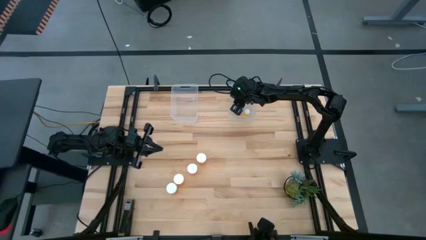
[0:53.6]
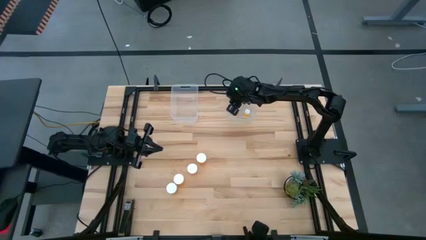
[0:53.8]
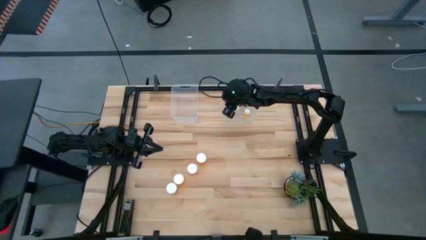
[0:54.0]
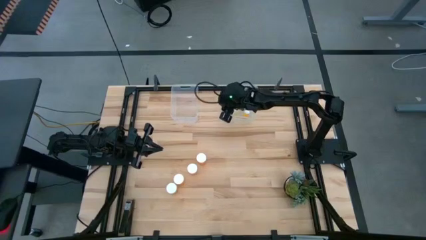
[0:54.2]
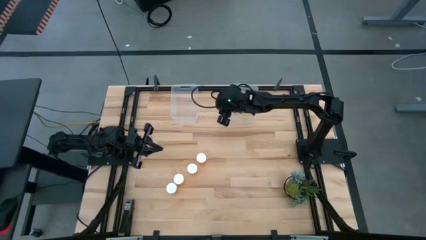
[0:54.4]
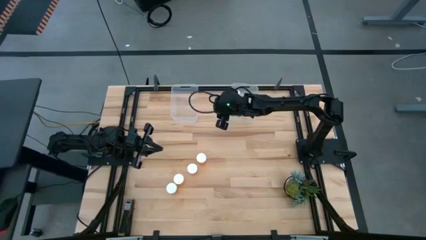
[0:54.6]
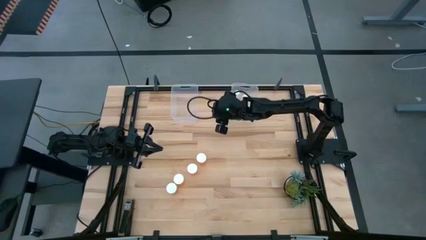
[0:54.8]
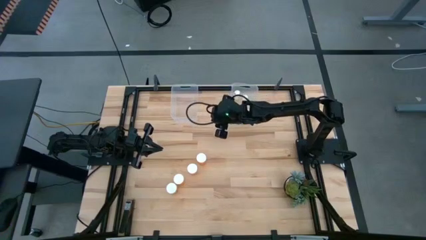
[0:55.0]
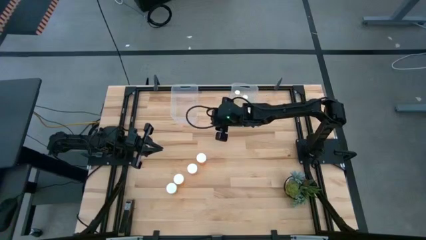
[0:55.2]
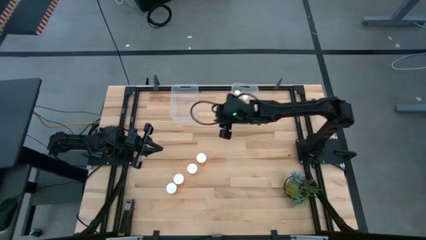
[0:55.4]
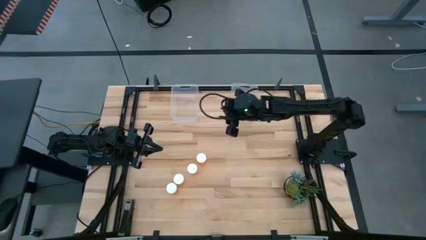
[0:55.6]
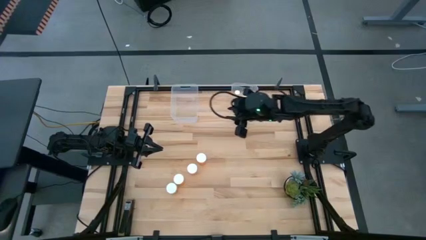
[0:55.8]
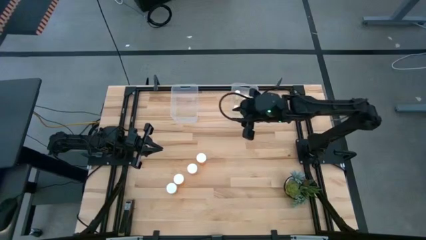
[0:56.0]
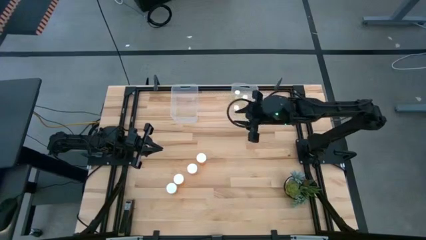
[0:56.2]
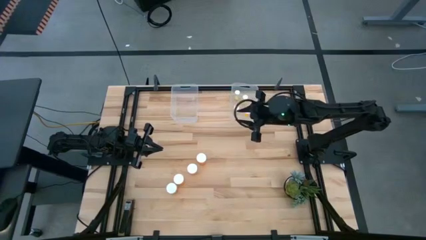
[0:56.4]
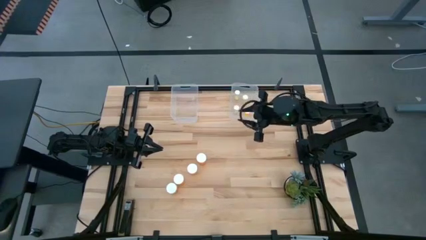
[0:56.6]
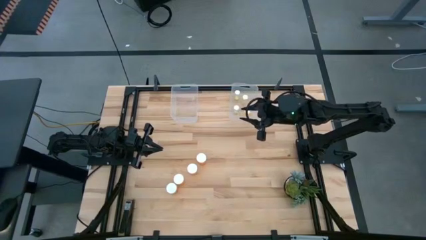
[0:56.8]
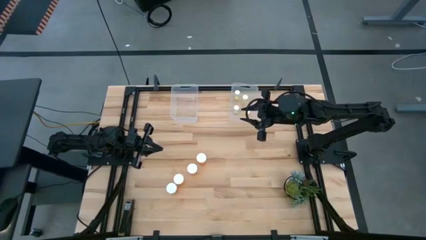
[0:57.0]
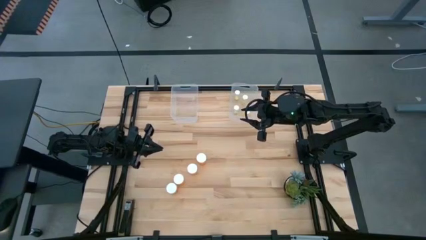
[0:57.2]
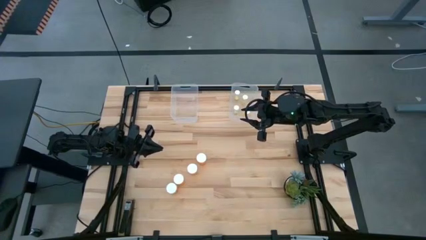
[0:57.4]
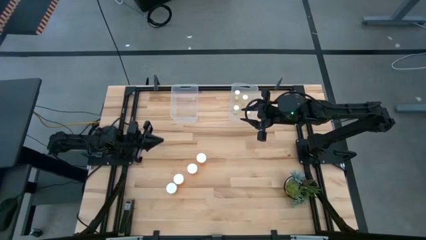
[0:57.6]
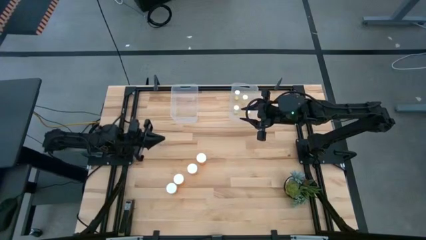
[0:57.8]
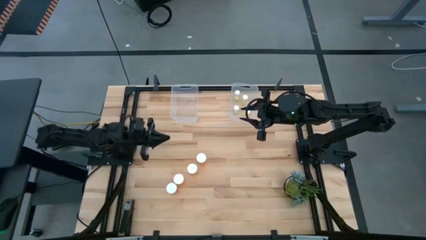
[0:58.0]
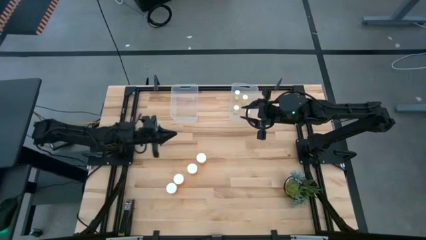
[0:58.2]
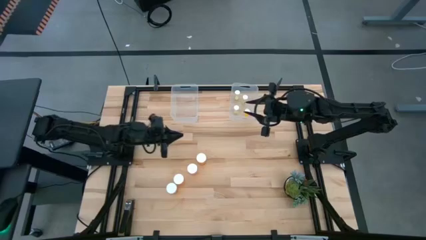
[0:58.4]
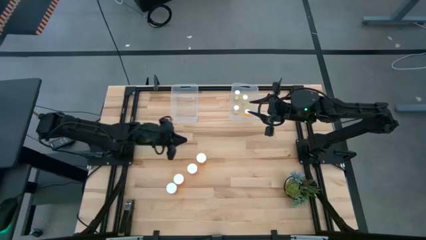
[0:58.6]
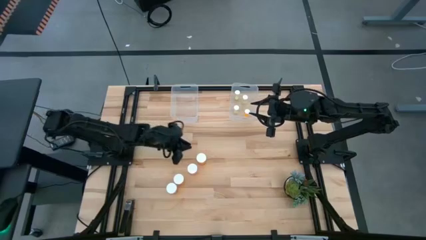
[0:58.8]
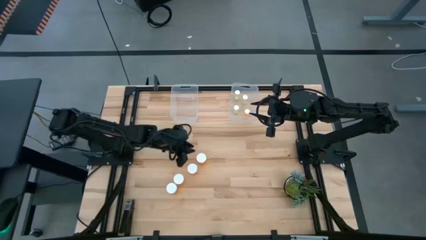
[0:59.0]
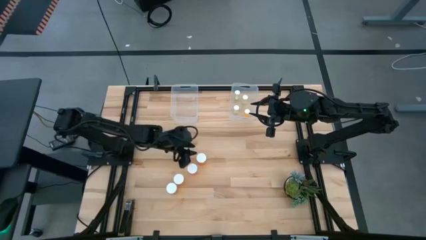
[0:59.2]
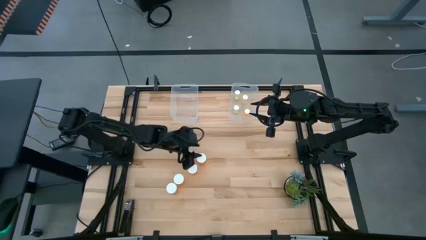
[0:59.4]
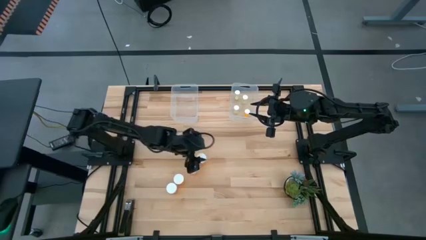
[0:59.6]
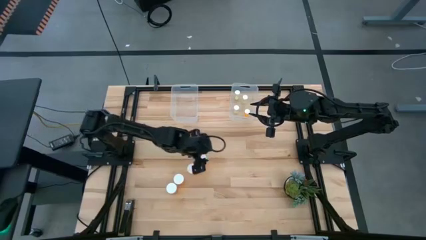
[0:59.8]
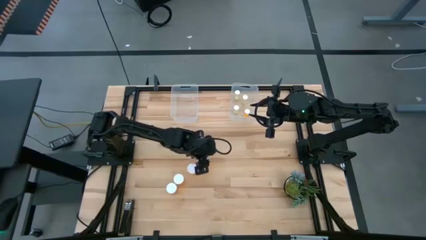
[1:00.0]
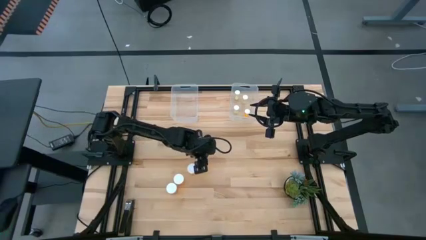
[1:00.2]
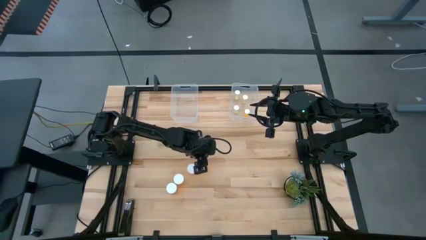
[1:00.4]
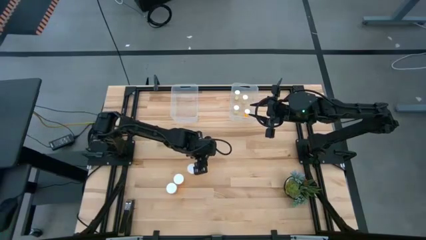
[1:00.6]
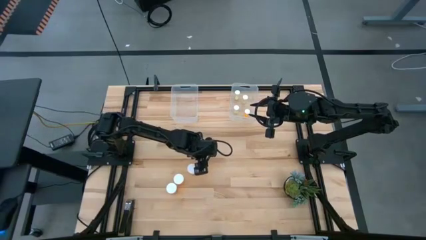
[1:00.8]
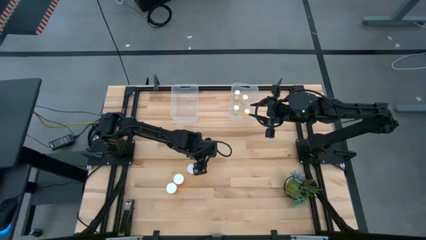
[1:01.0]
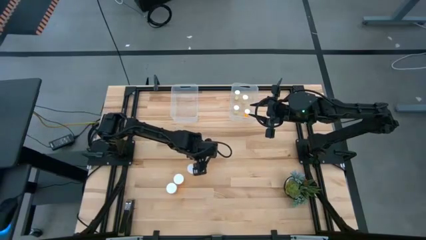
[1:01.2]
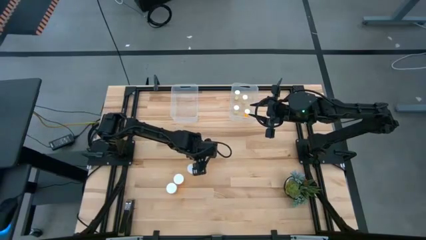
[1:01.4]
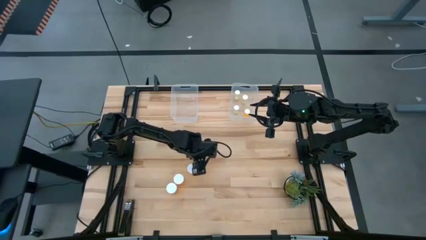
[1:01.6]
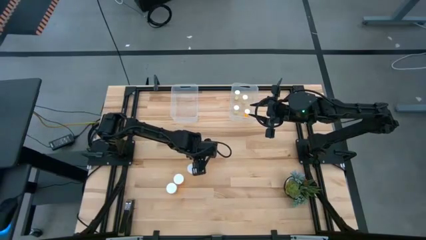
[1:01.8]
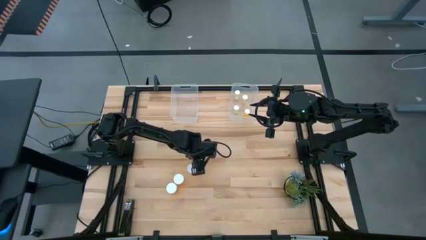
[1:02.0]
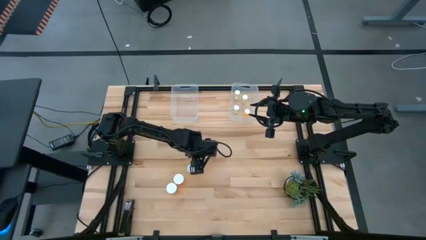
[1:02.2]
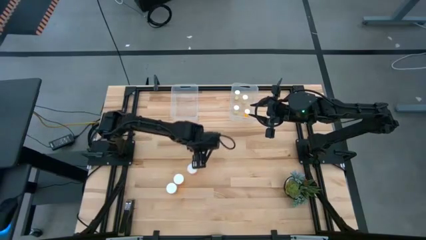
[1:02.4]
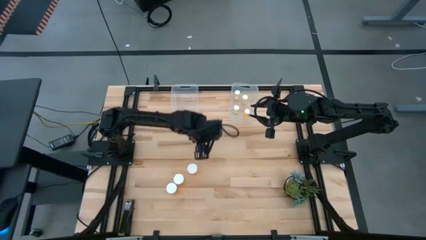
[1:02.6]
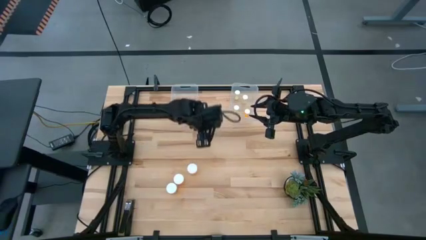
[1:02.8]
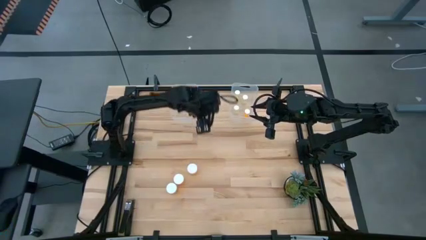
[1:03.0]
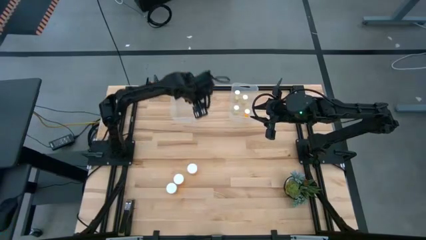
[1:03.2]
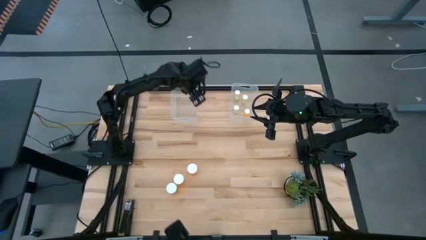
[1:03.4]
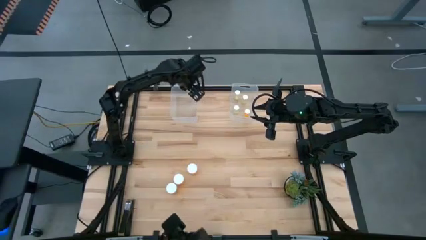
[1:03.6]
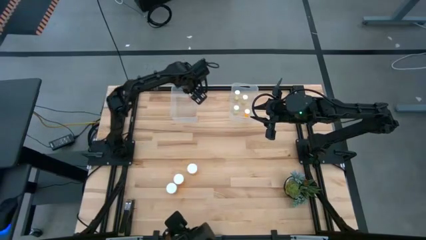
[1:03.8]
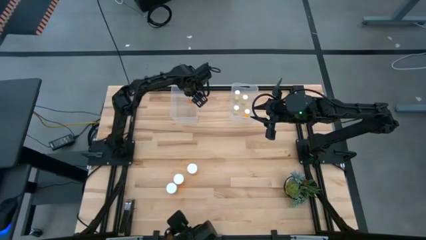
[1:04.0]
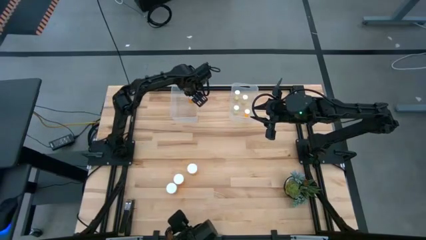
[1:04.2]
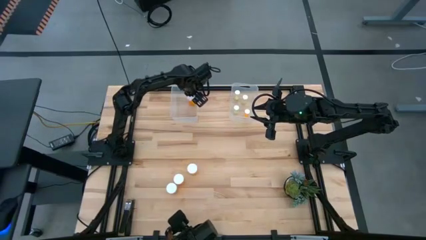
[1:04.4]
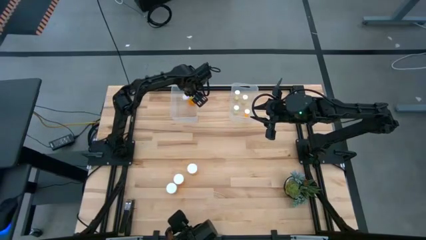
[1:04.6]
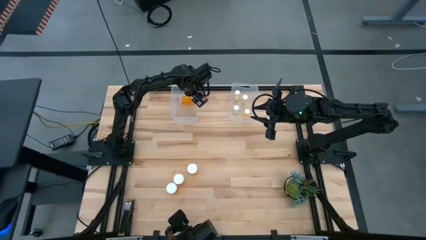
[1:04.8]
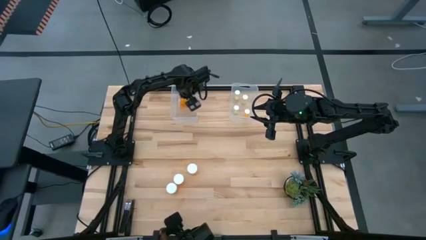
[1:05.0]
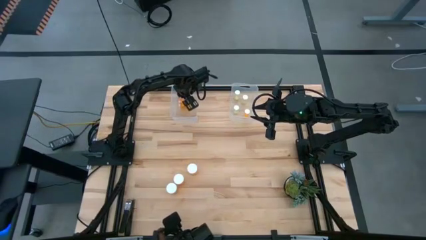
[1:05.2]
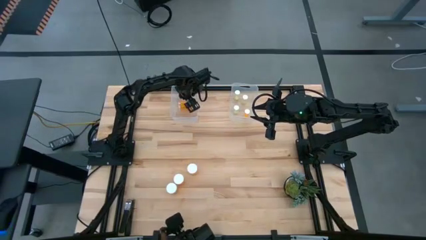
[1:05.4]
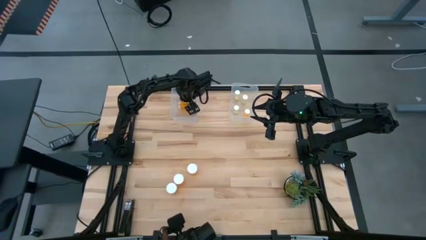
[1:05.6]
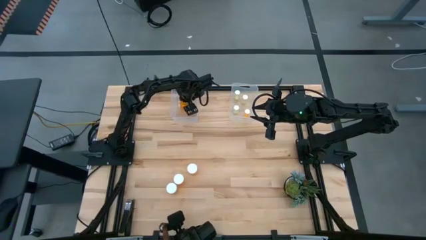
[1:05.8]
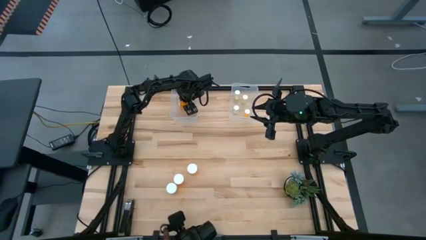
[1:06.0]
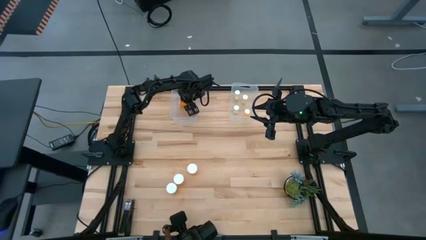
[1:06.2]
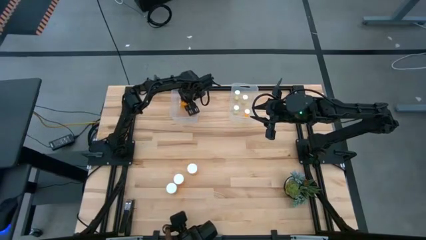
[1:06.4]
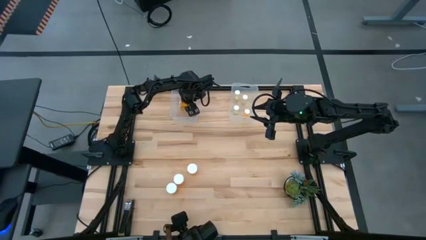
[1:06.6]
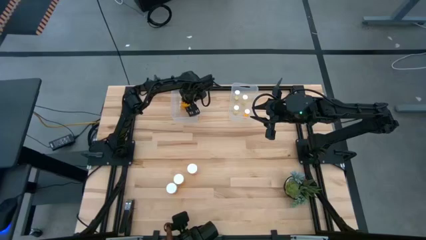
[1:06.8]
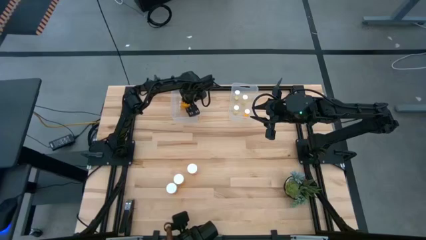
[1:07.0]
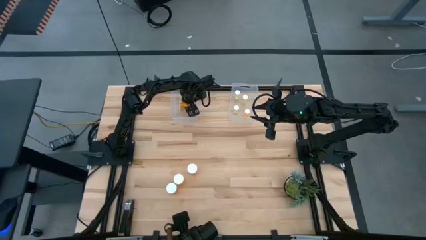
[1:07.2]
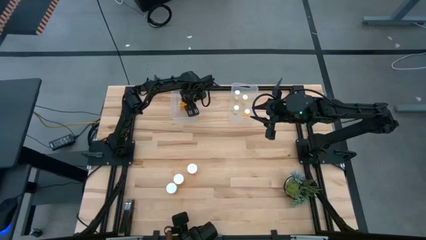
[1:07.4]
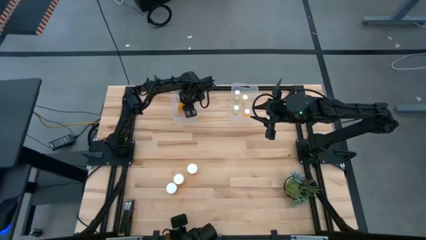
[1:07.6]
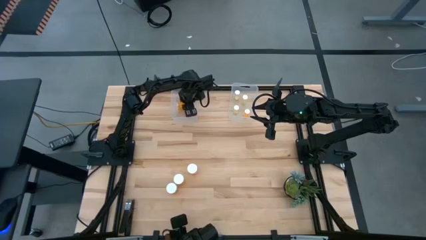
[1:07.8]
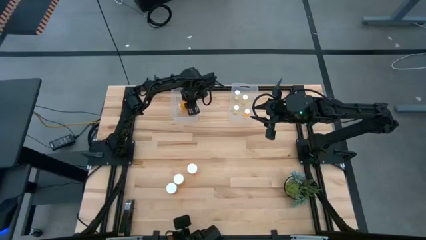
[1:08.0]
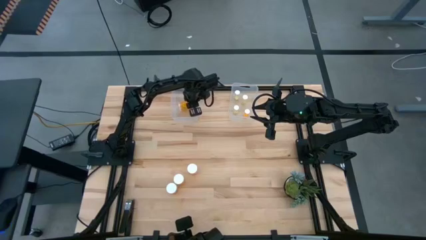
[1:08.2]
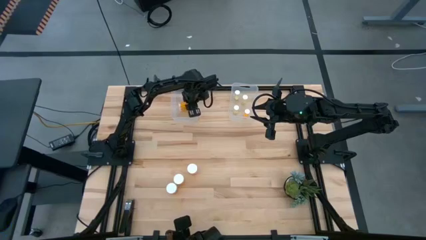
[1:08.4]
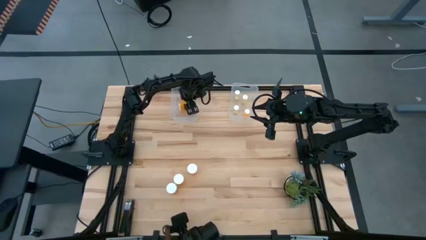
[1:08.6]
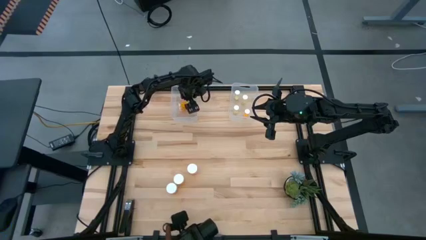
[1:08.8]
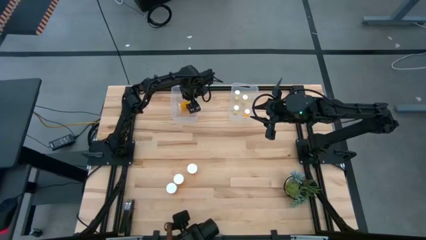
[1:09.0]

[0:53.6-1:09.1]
Task: Pick and place medicine bottles into bin by pill shape (circle, oval)
Put the top big orange pill bottle into the left transparent bin
